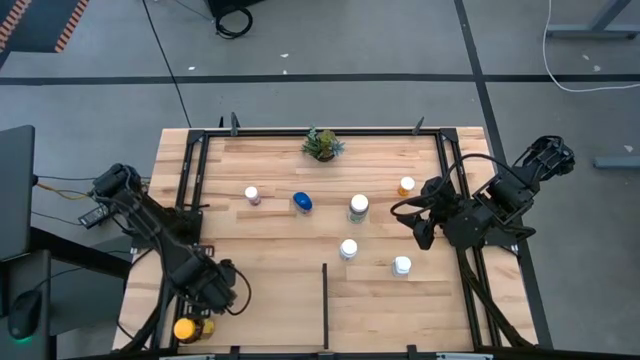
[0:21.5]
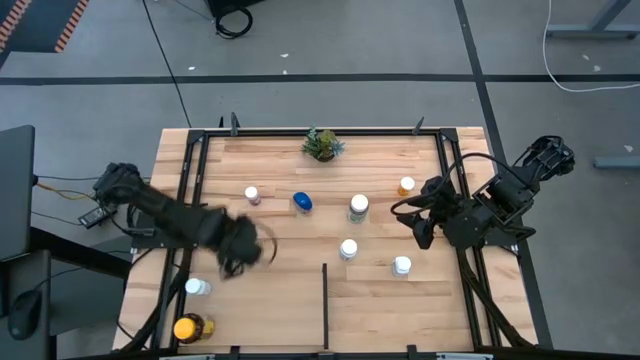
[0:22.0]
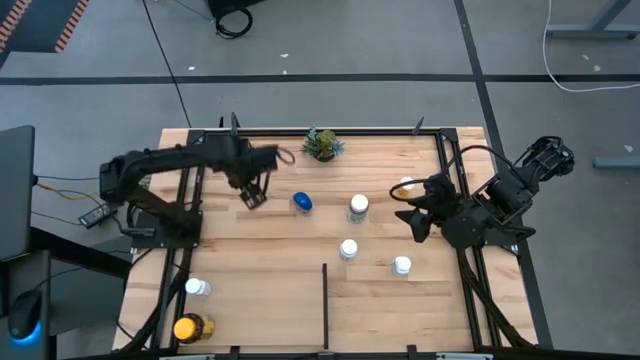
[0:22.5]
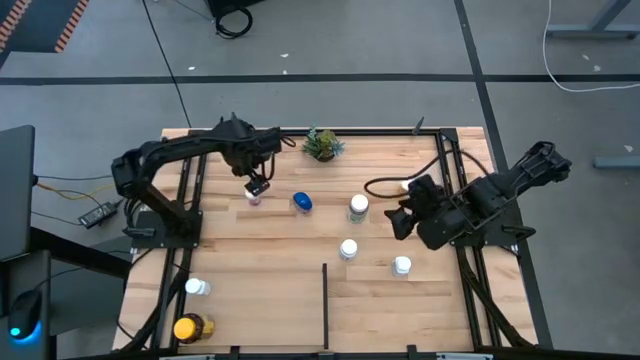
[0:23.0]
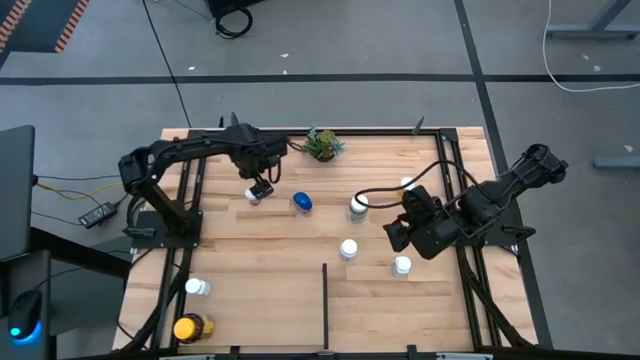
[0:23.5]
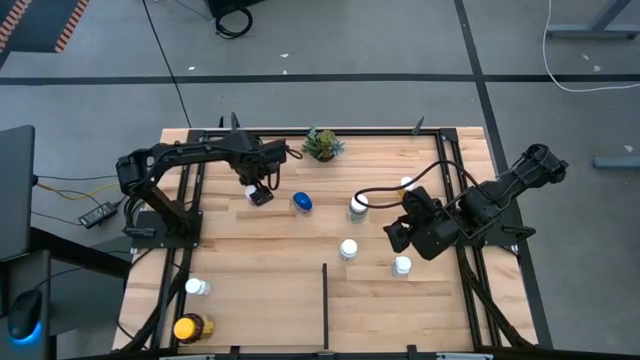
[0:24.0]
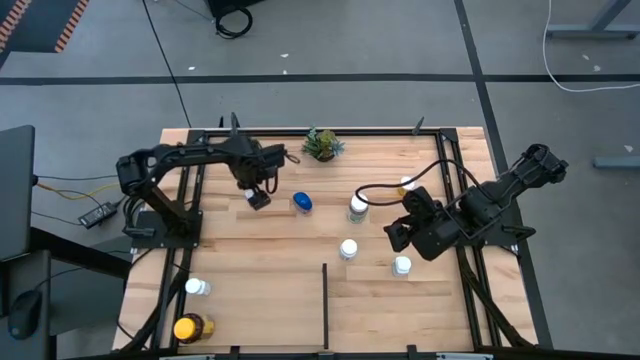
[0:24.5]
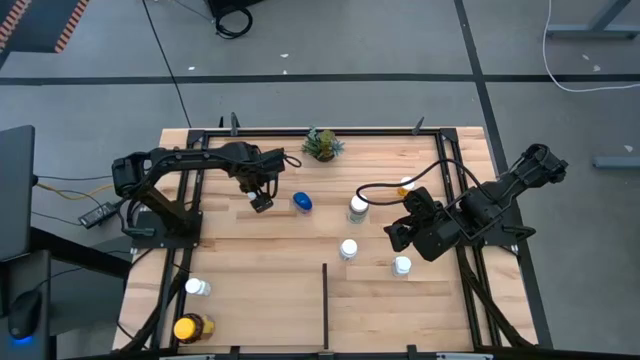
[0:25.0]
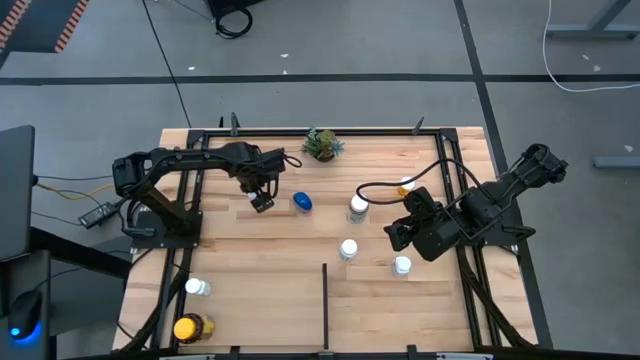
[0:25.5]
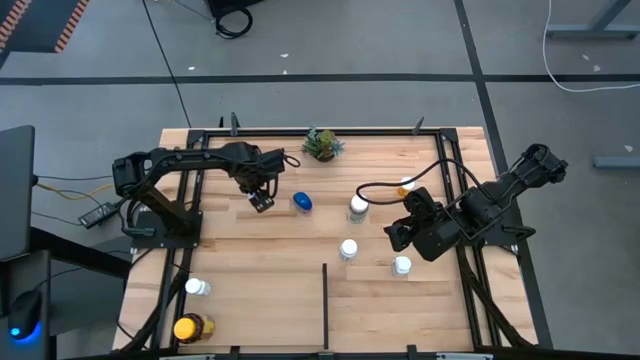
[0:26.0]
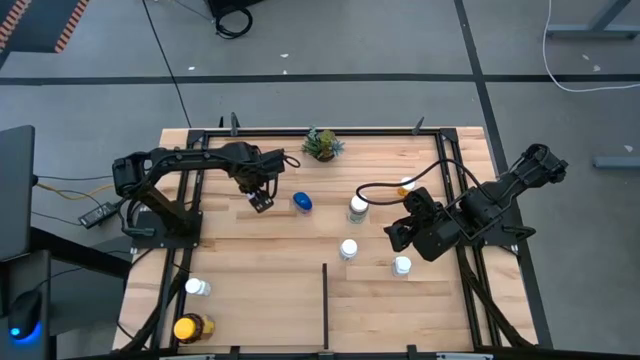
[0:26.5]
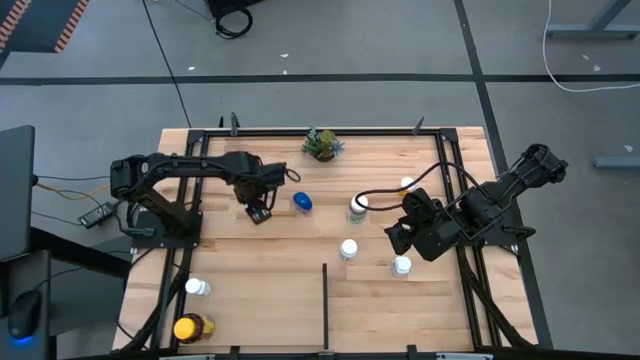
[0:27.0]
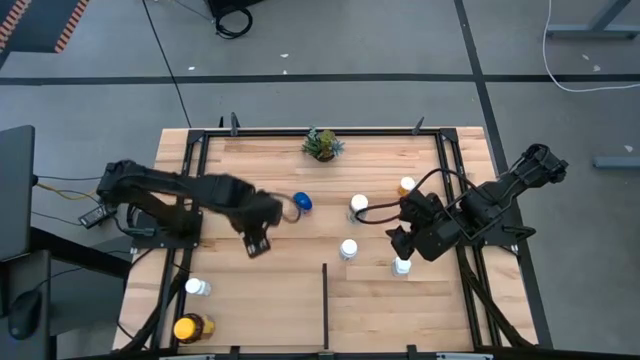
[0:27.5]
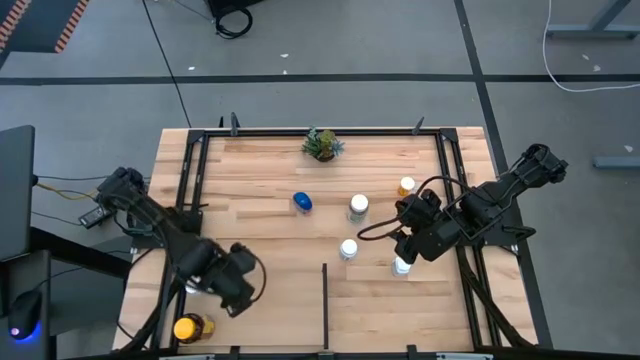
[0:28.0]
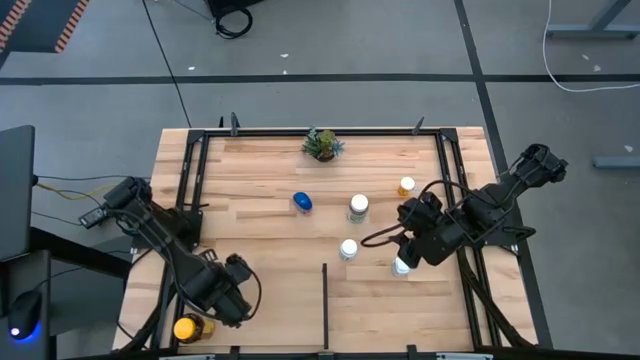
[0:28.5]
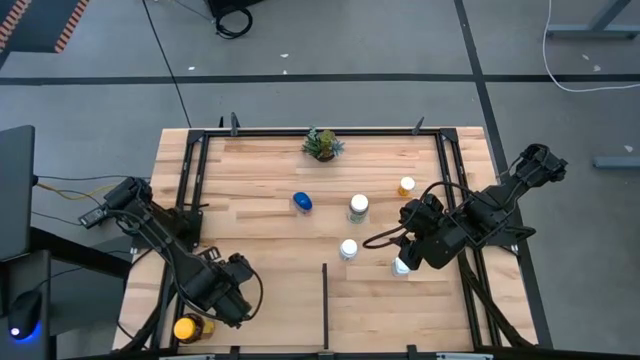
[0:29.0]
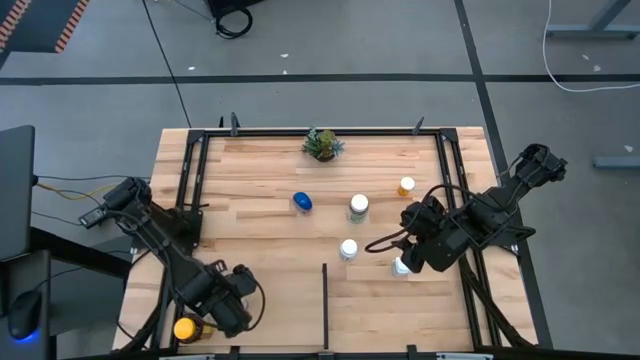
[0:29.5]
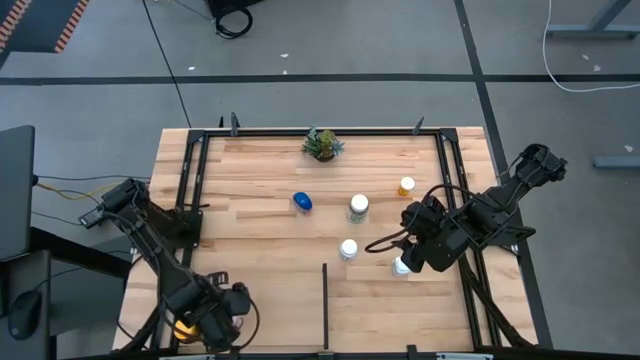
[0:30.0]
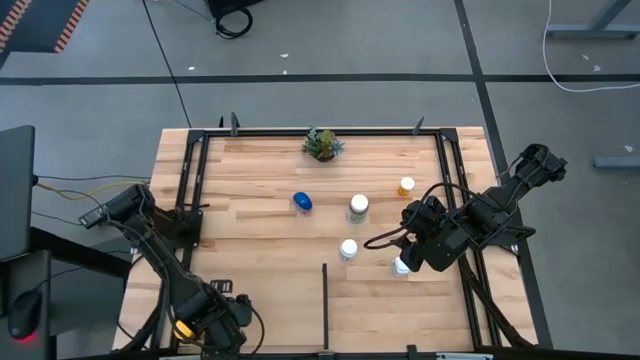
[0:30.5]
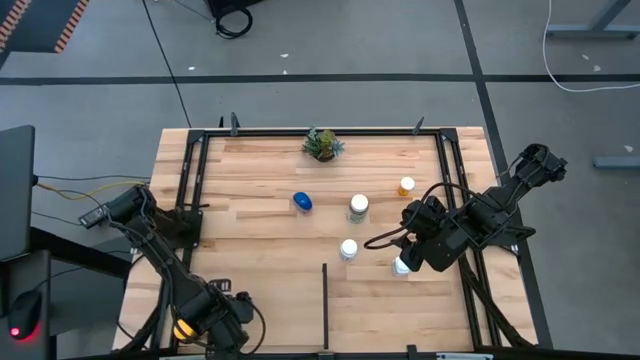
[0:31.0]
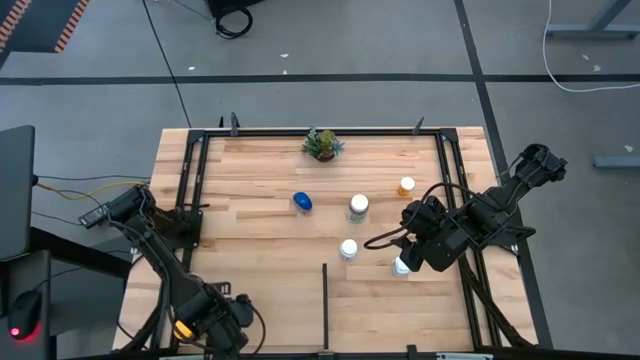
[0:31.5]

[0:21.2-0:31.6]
Task: Pick and place medicine bottles onto shelf by color
Put the pink medicine bottle on the shelf

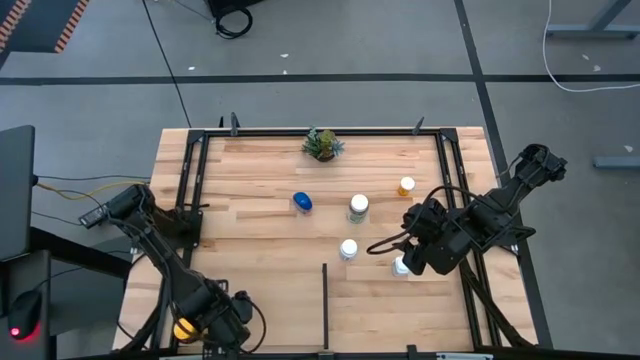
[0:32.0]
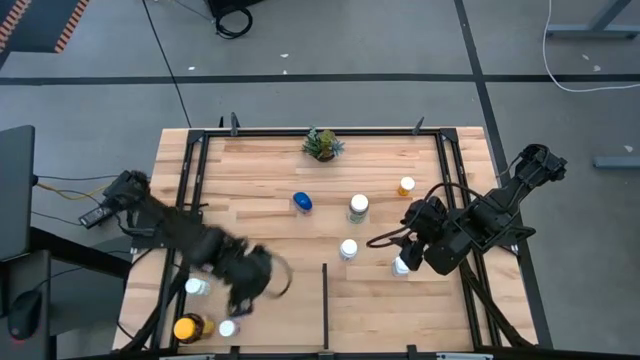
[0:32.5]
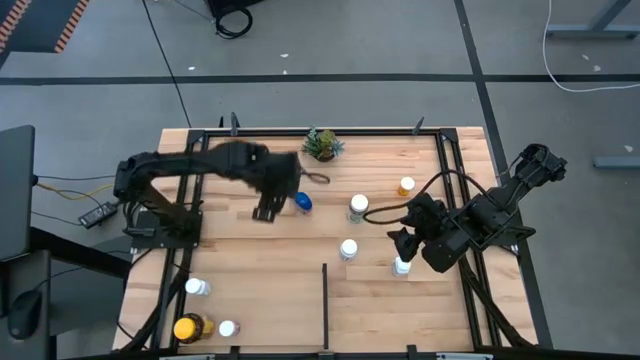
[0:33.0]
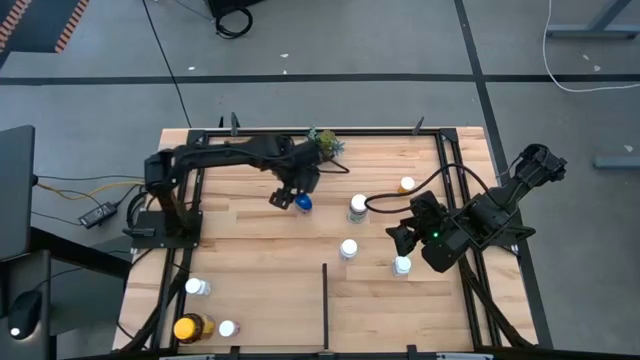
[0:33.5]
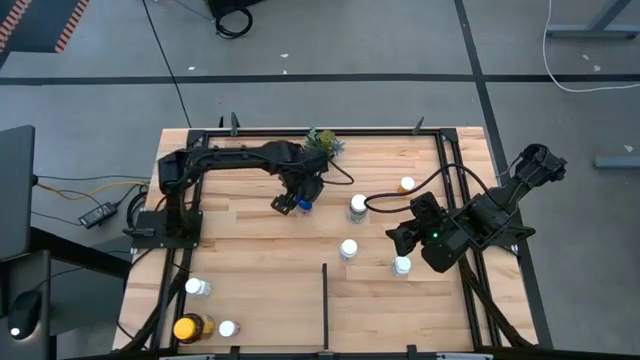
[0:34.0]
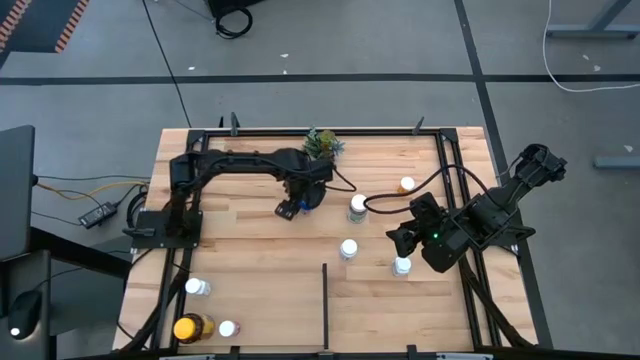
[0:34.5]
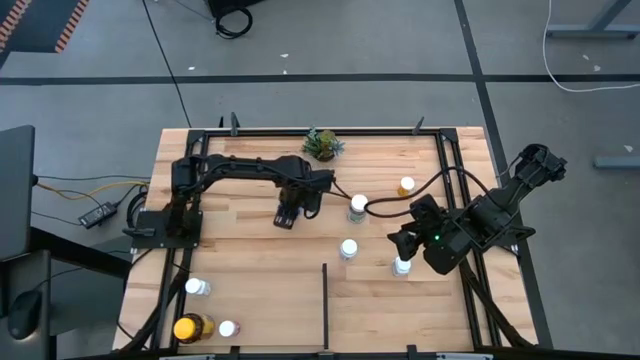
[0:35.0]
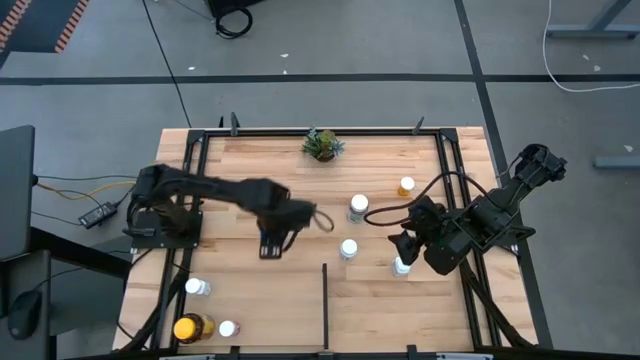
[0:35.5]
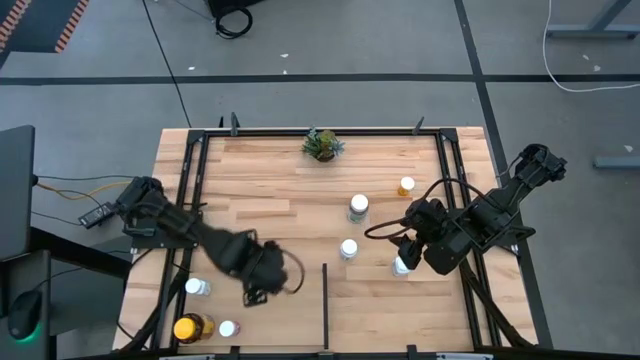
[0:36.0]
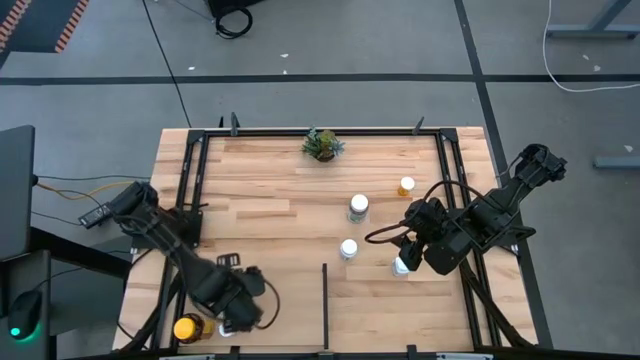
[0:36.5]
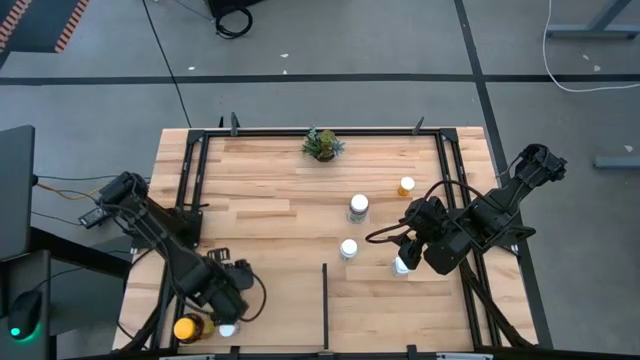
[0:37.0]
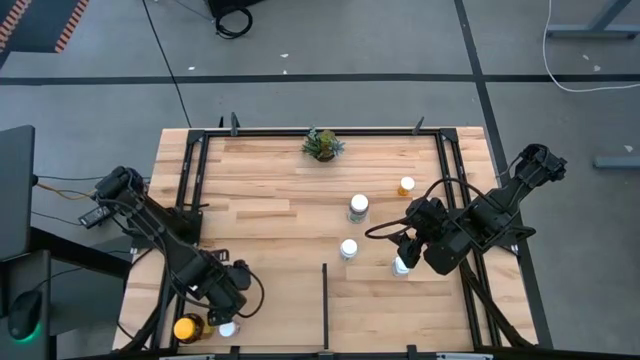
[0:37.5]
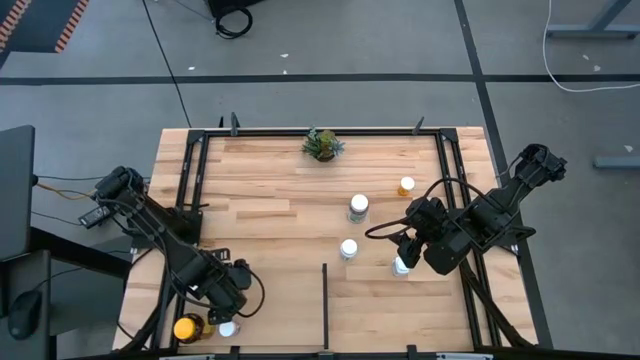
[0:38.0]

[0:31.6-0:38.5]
Put the blue medicine bottle on the shelf

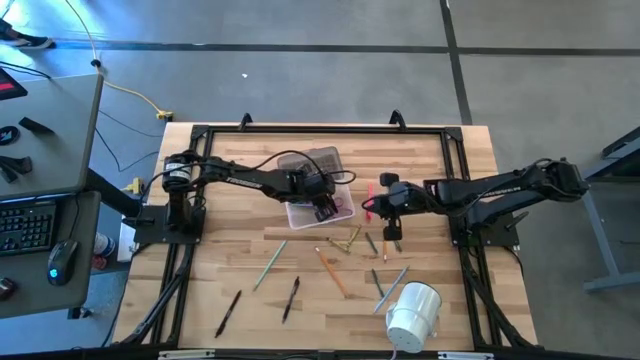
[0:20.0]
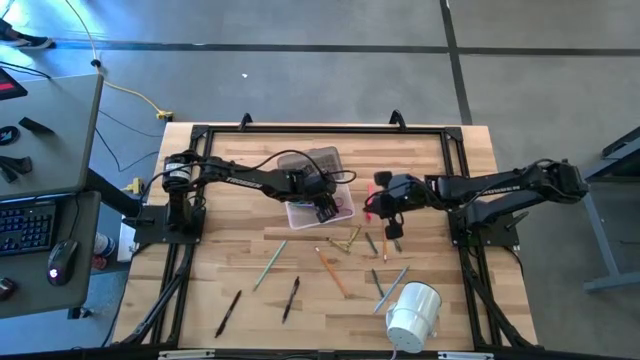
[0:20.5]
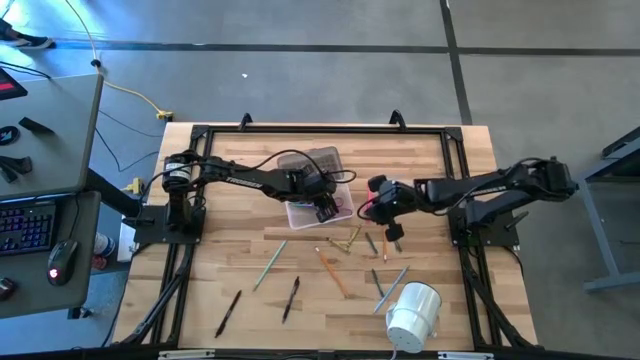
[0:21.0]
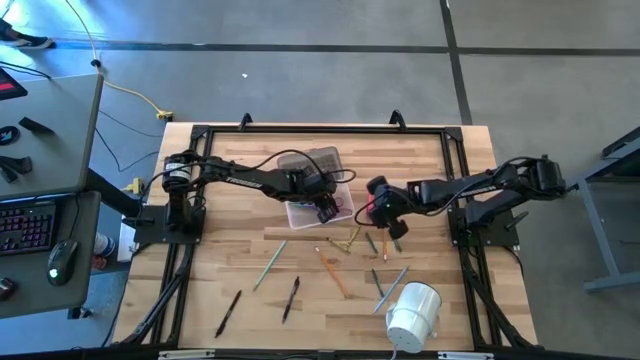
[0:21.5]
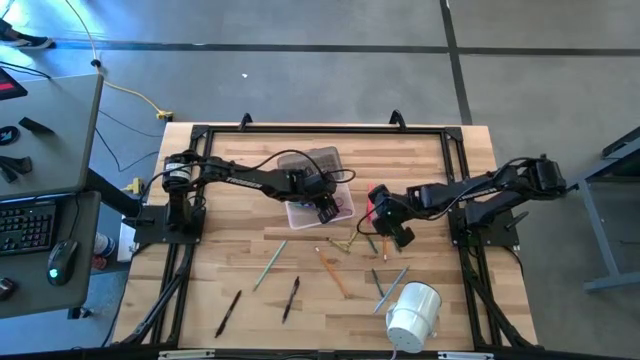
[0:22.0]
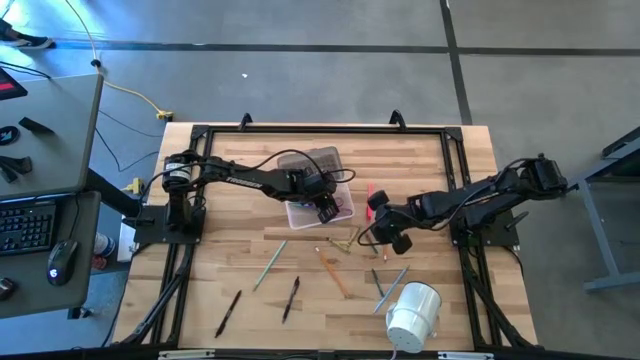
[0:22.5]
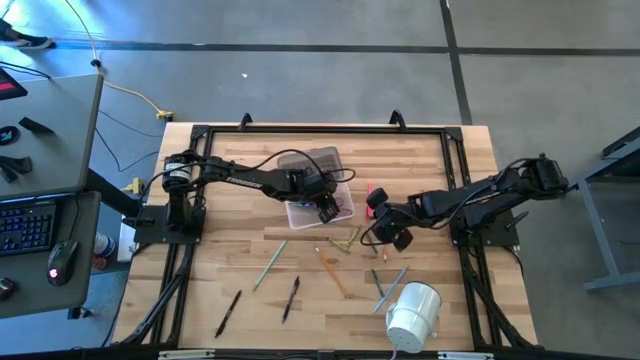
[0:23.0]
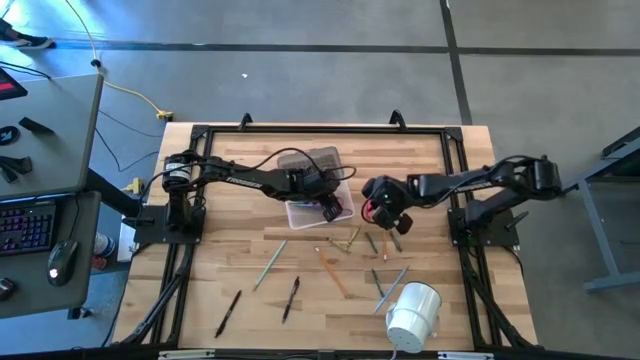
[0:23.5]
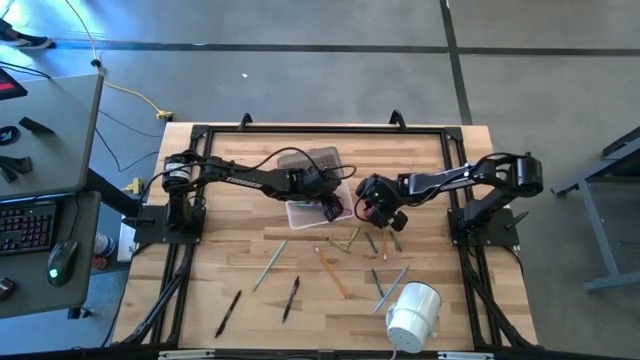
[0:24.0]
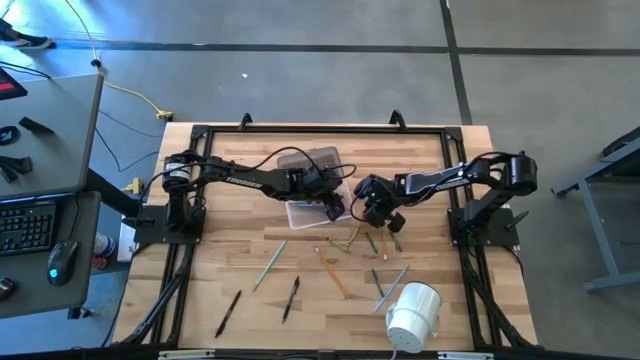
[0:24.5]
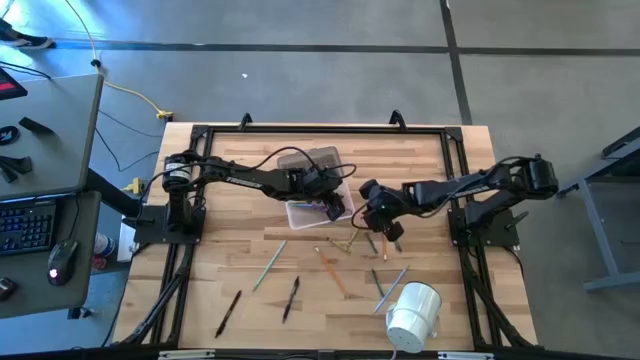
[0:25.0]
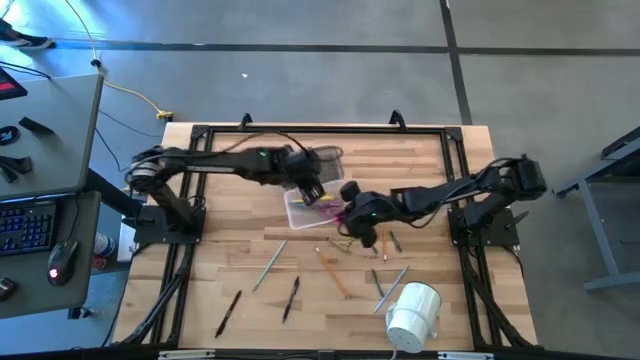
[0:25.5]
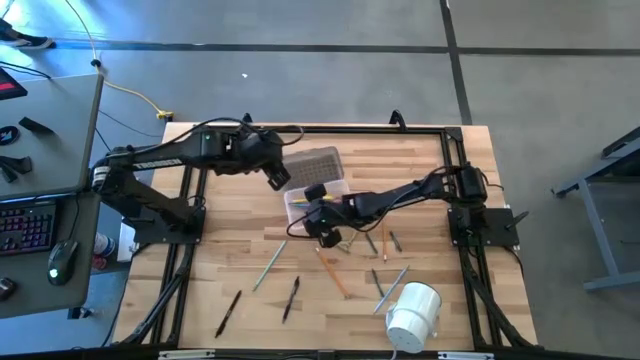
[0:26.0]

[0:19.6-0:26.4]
Task: Pick & place school supplies into a supply box
Put the pink pen into the supply box
